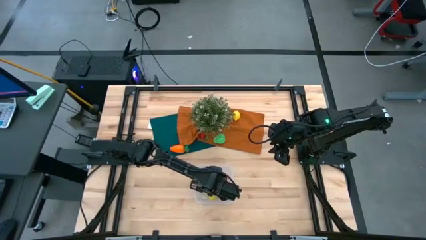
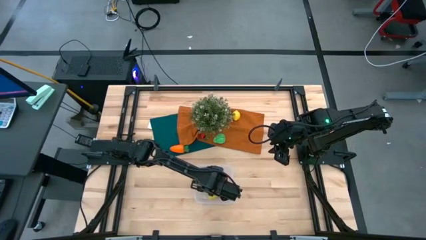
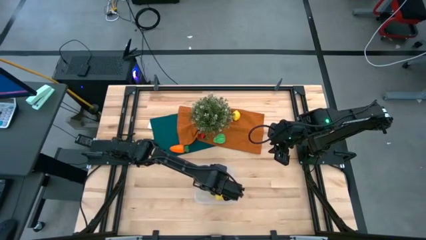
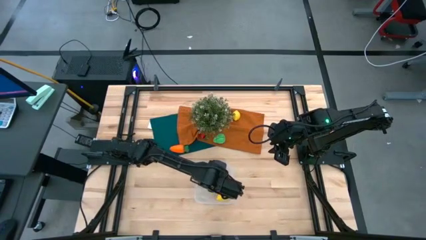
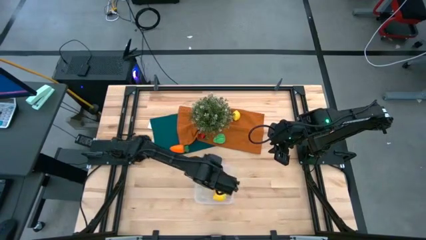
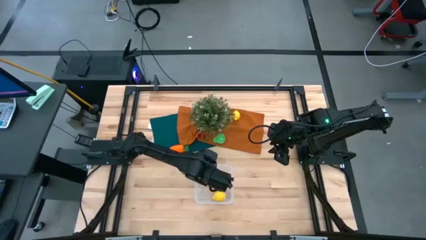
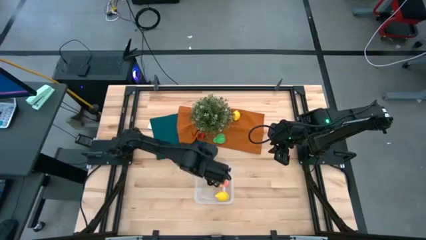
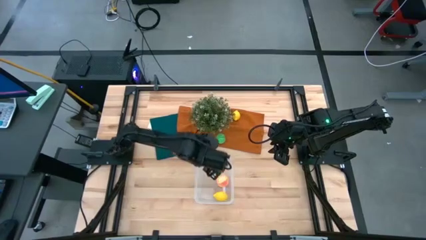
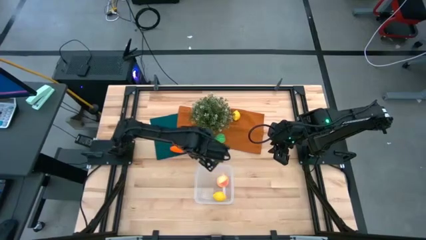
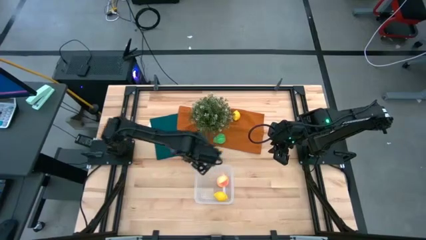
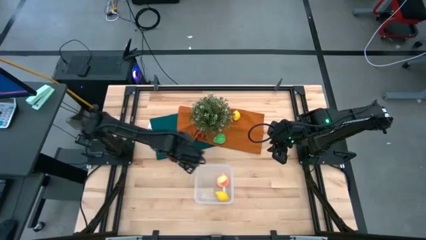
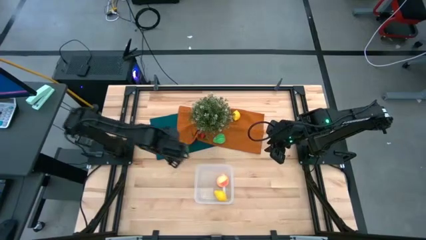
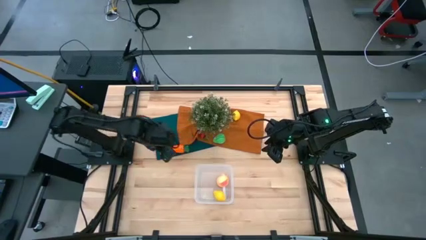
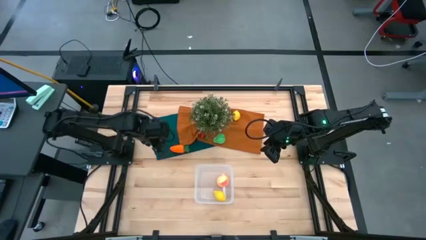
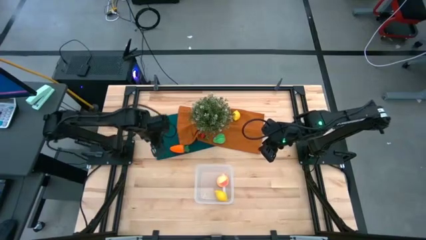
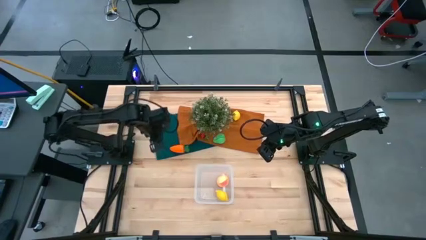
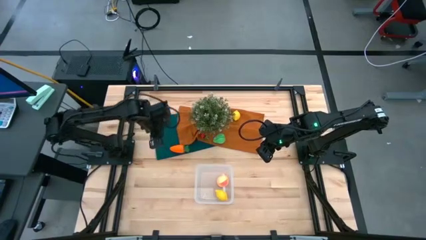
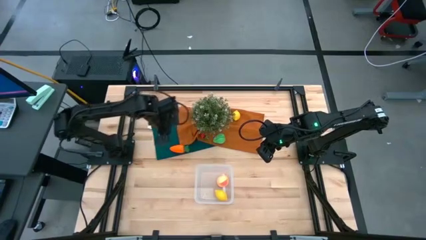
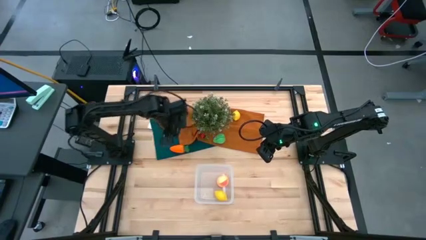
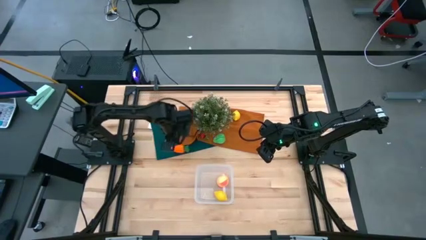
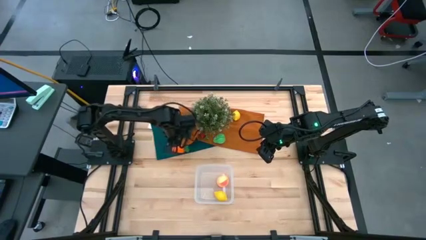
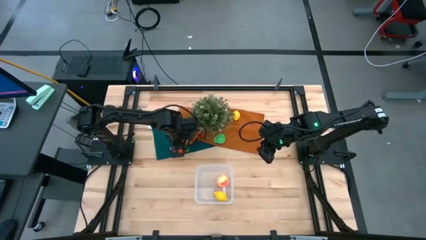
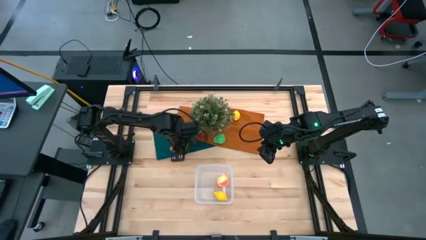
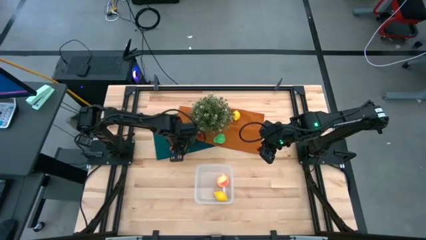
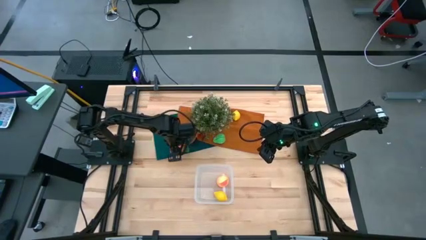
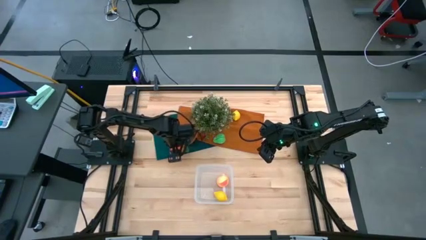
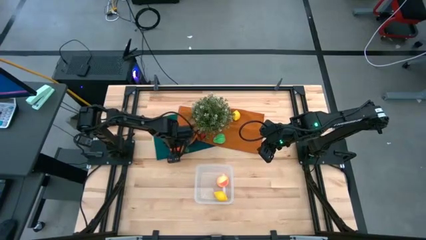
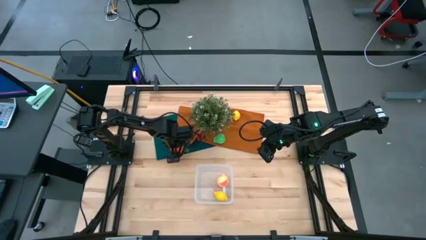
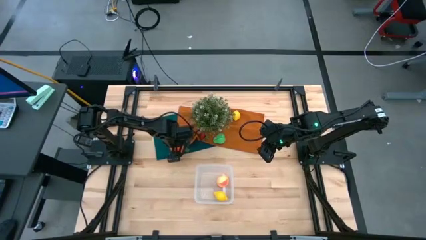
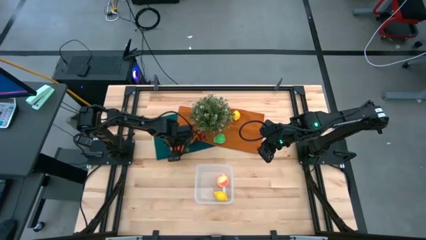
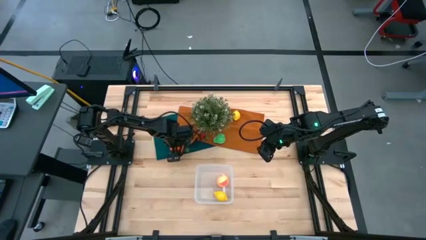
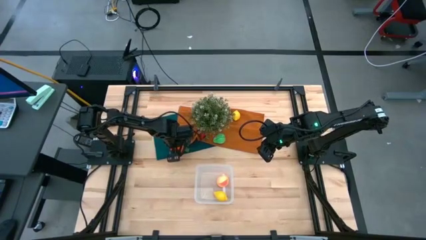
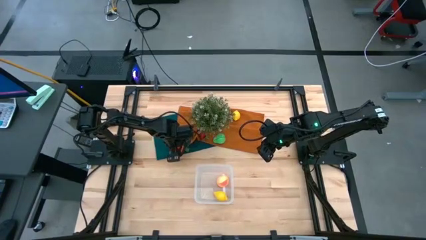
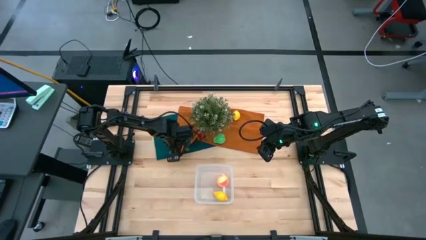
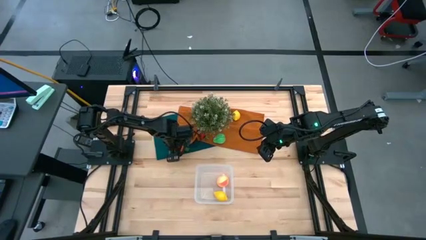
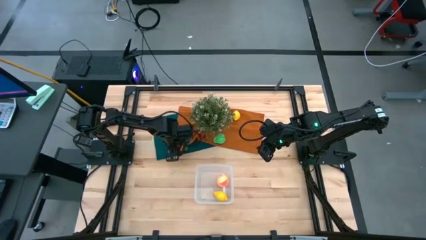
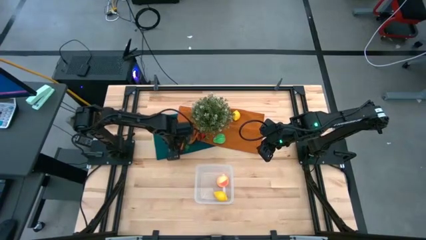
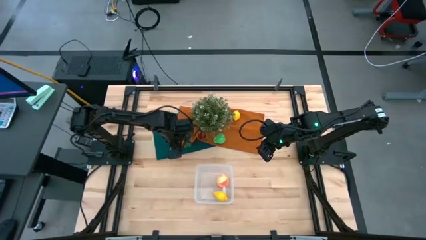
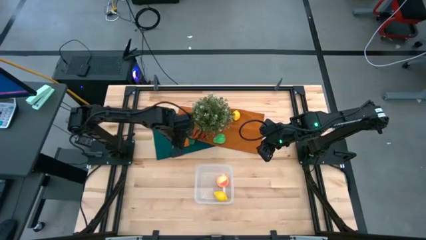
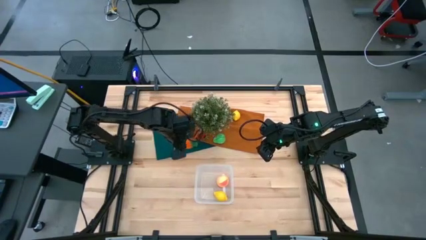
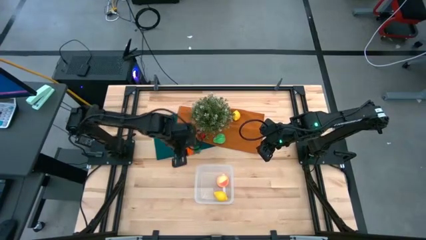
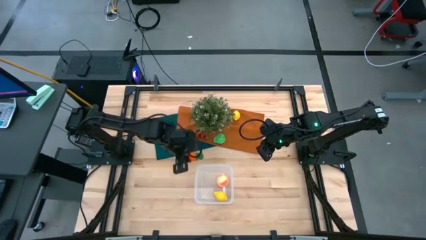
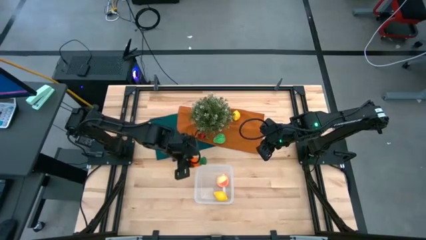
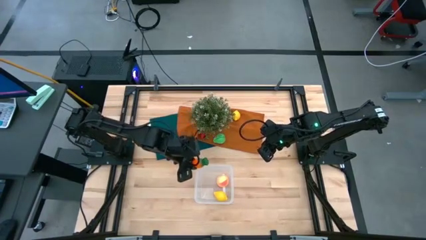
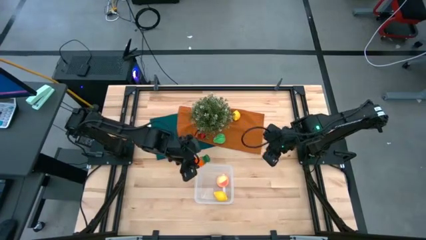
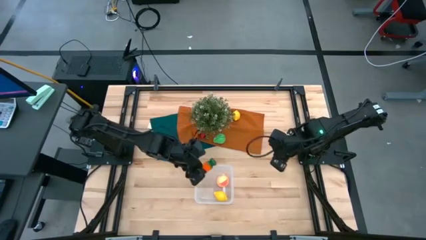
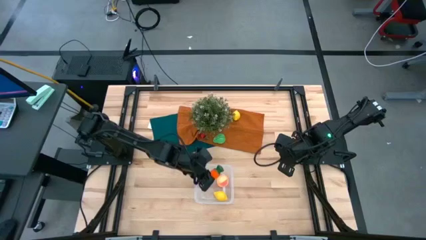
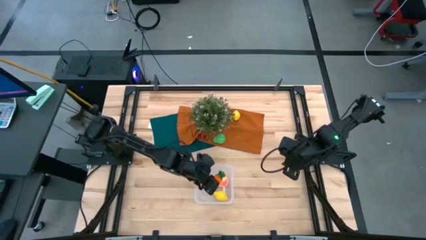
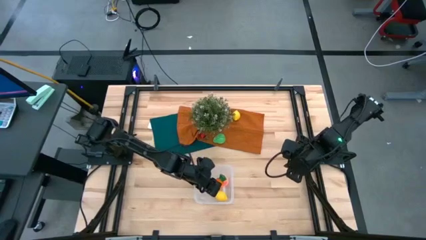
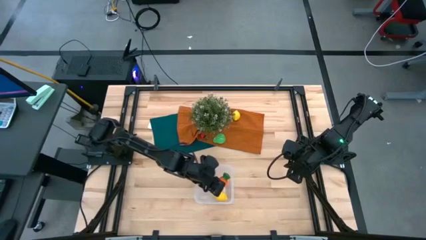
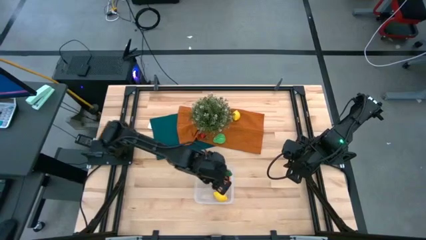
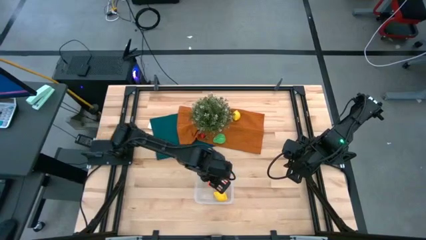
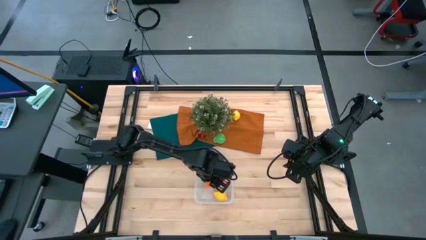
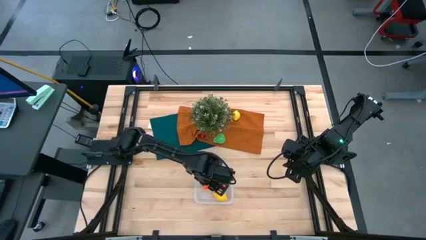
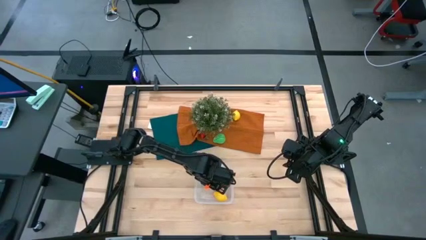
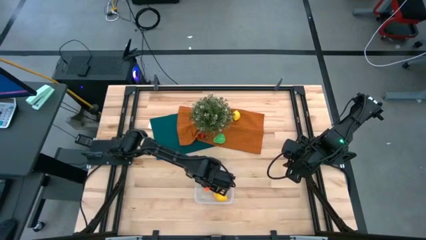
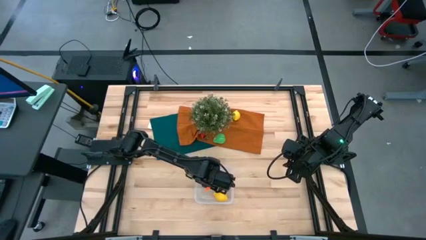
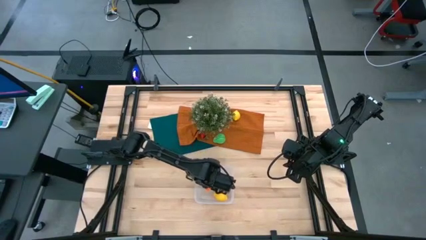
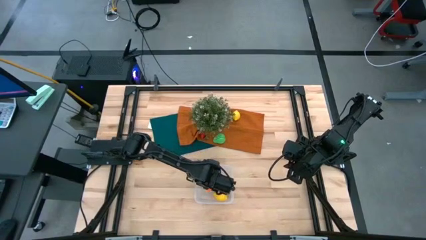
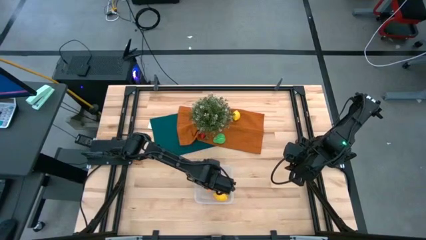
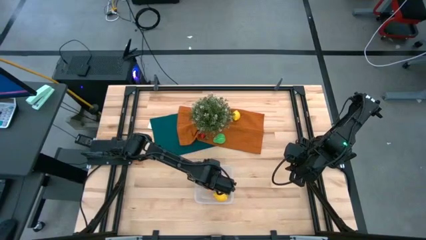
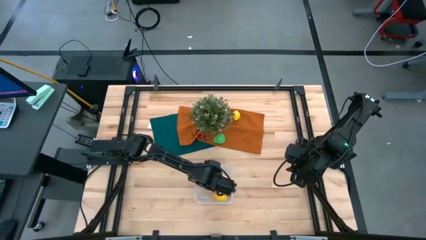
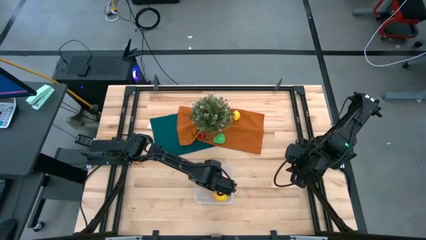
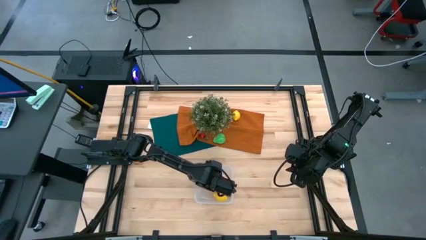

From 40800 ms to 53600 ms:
Task: Pick and placing Produce into tupperware
Put the carrot into the transparent bin
